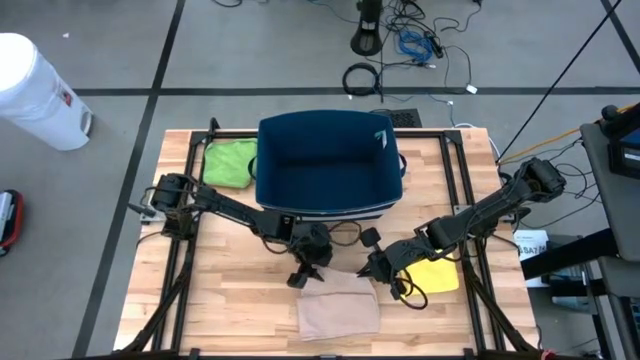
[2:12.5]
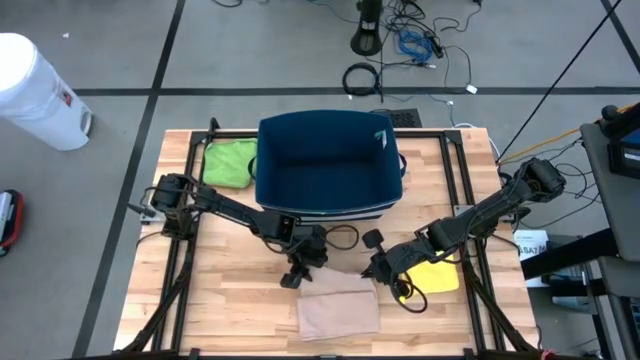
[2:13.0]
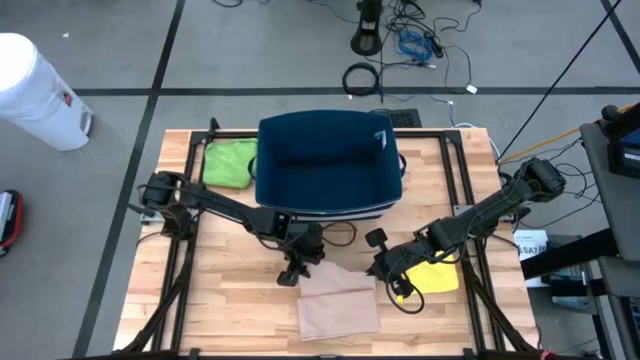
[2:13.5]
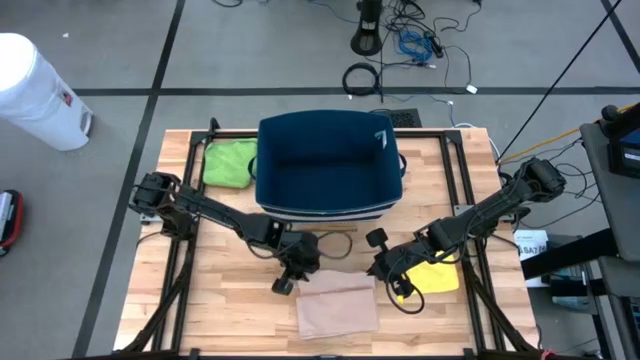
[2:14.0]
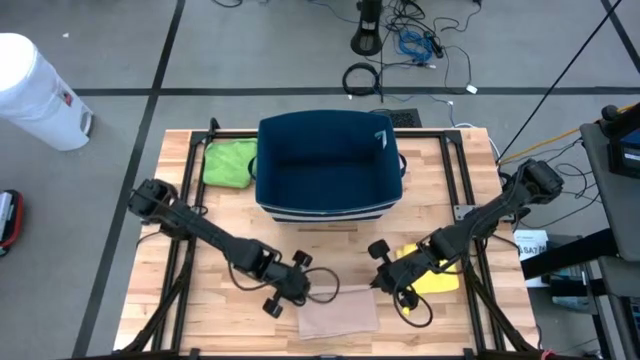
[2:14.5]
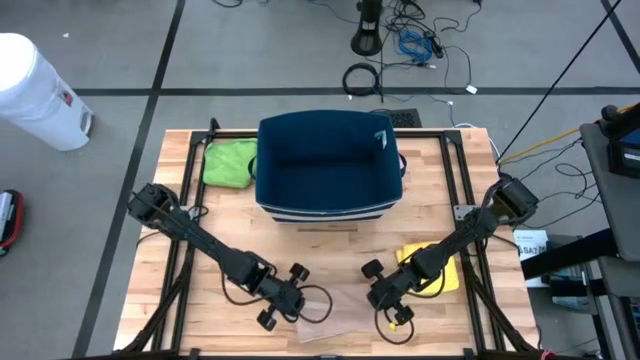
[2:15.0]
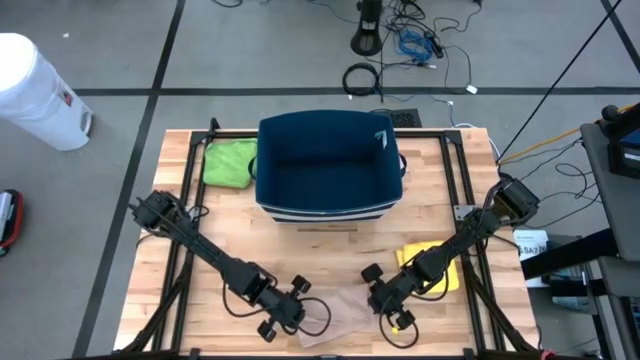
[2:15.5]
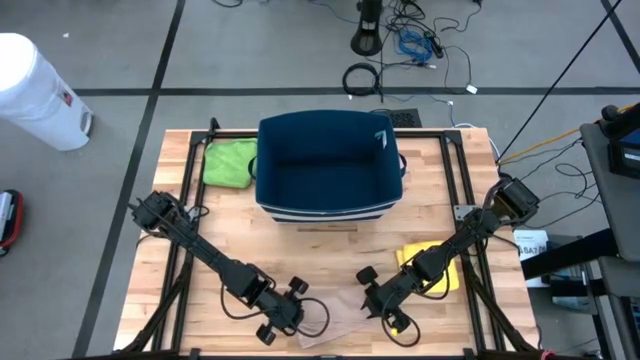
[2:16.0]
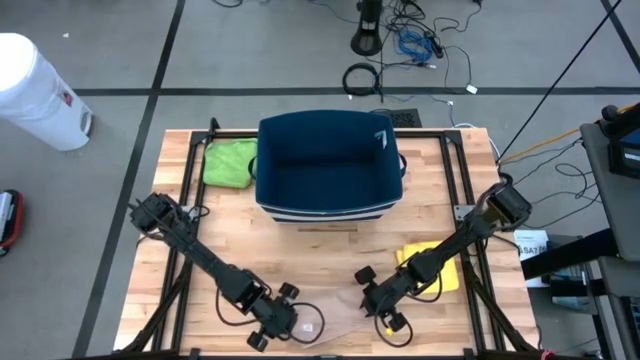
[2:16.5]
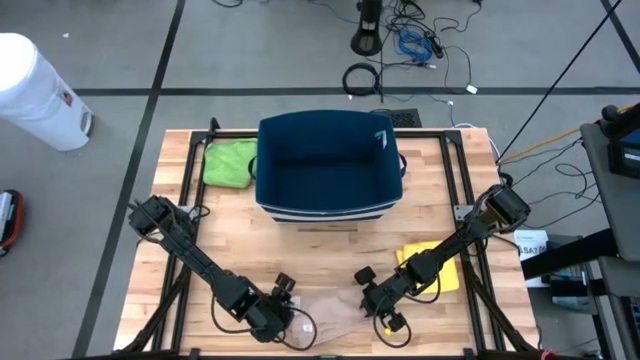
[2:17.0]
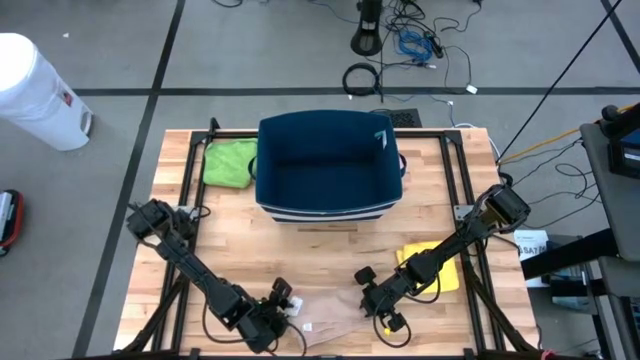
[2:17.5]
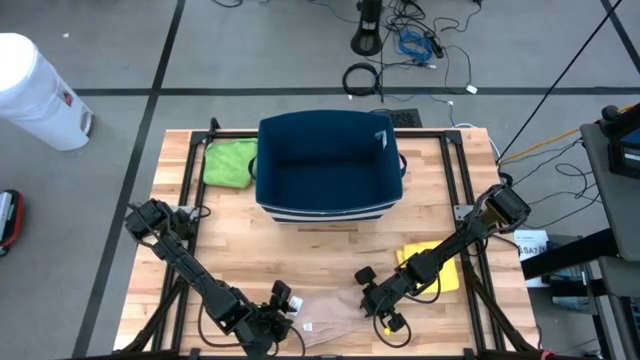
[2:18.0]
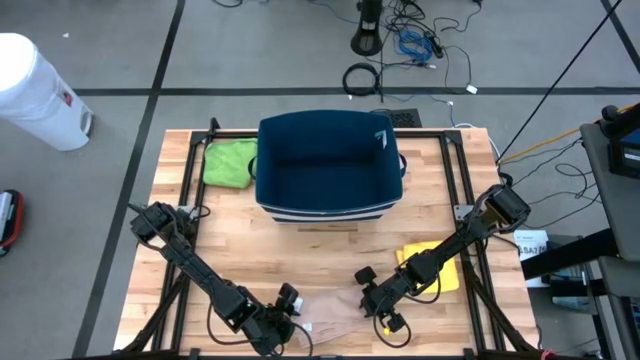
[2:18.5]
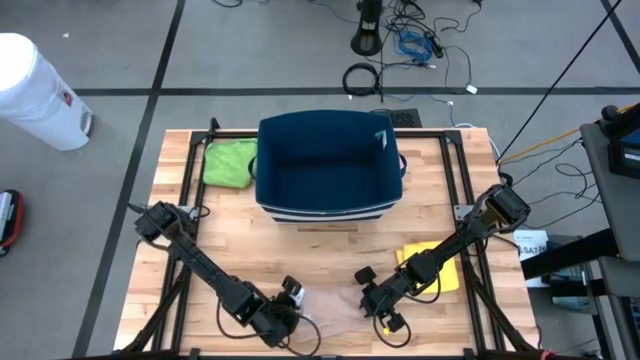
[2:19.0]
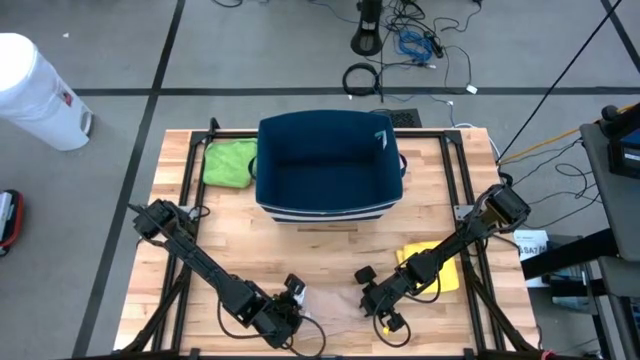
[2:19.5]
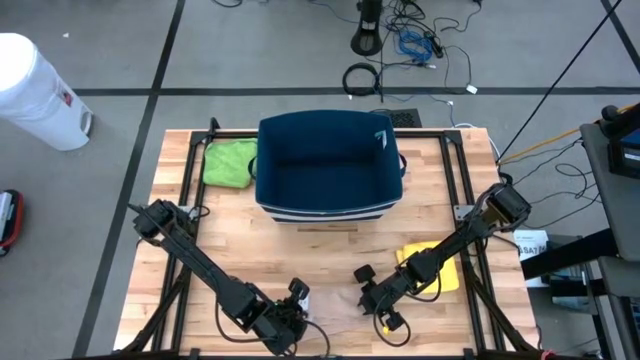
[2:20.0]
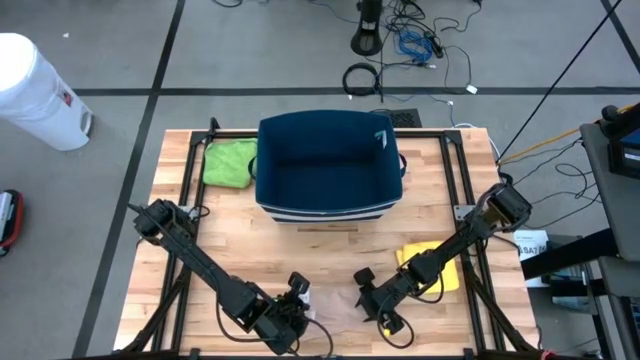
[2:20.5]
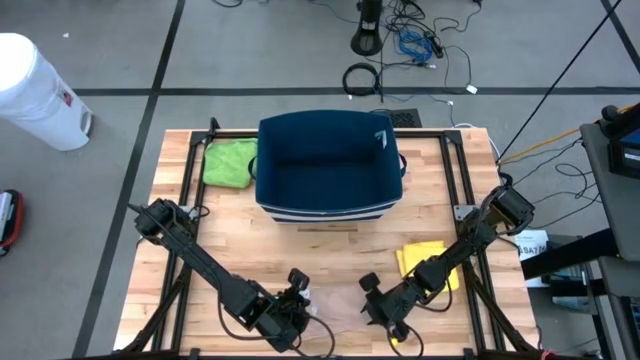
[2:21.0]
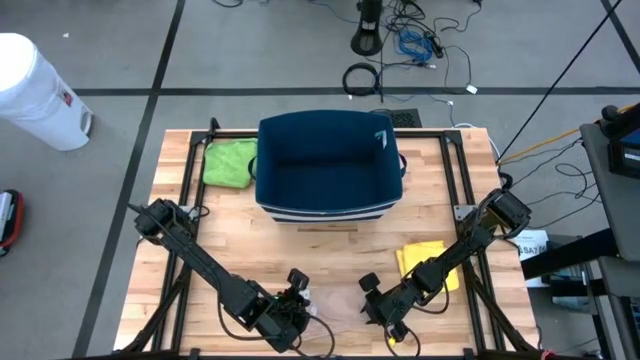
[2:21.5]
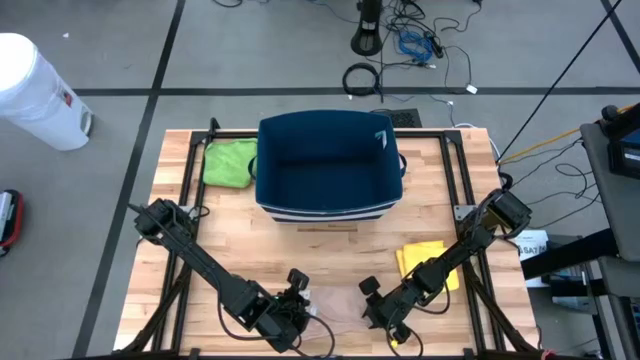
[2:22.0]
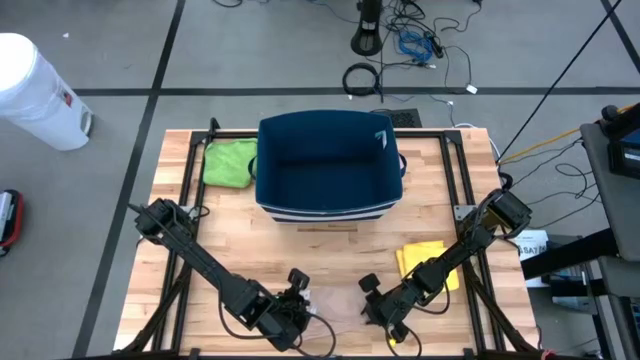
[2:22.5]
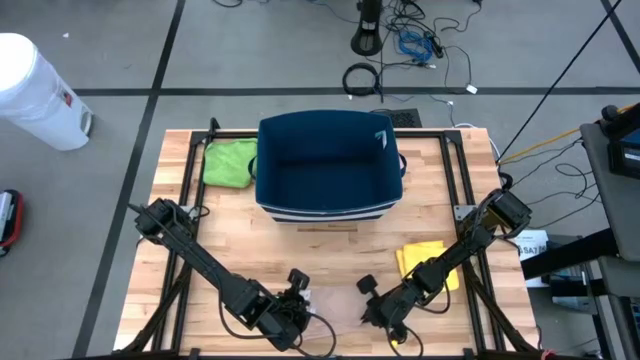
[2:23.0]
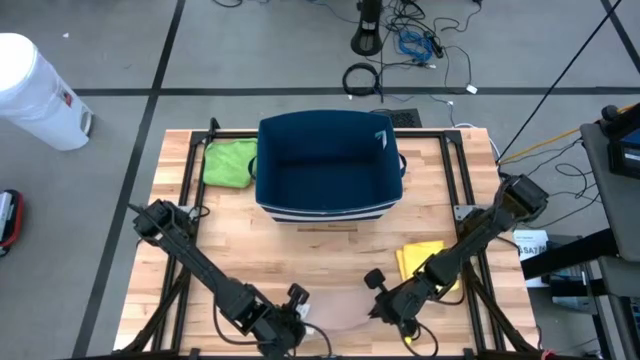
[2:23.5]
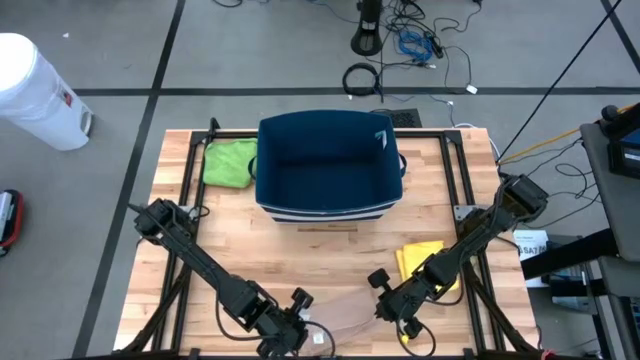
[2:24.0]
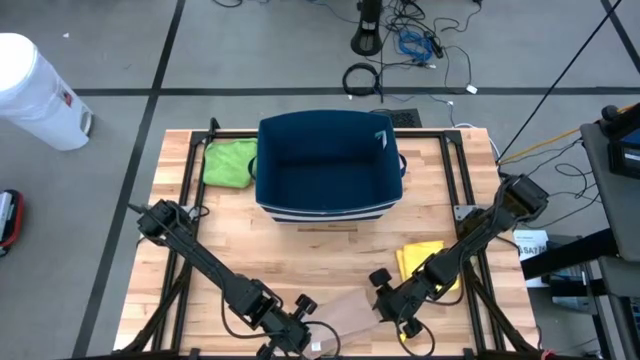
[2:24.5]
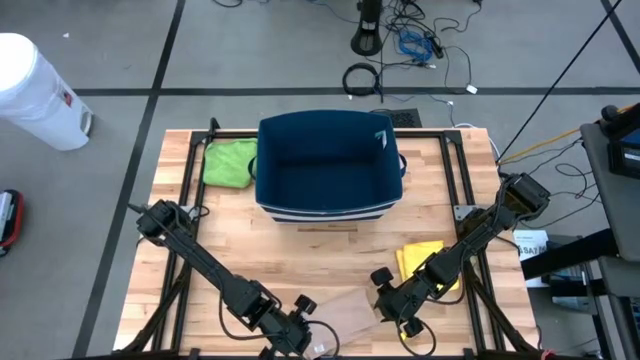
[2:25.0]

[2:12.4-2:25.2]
Task: Fold towel
Fold the light brown towel

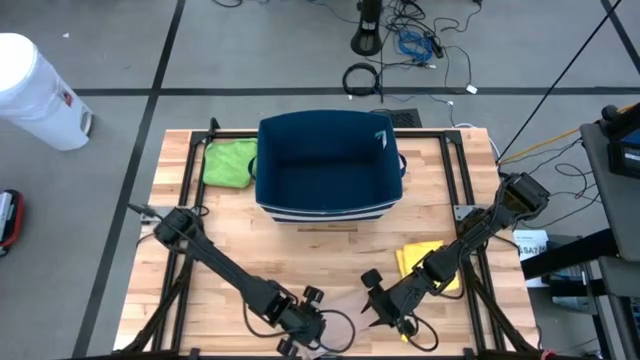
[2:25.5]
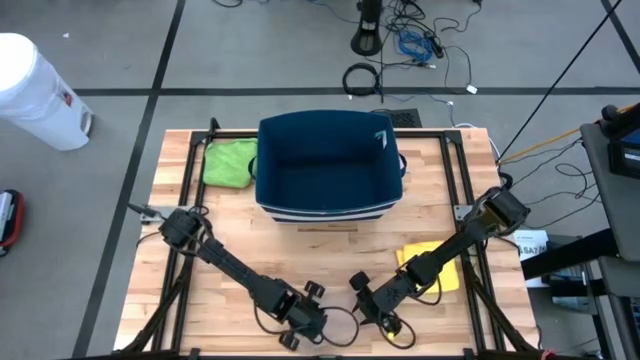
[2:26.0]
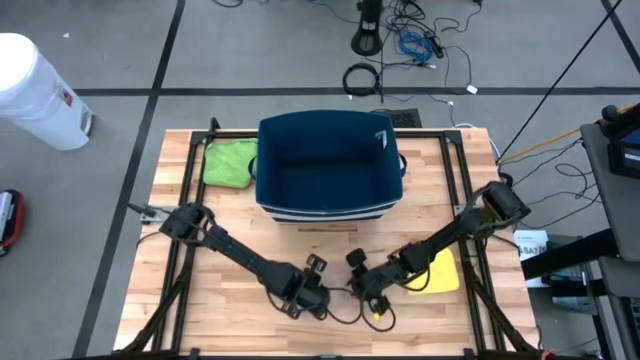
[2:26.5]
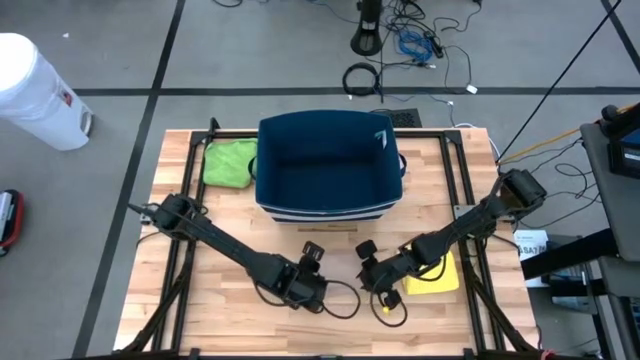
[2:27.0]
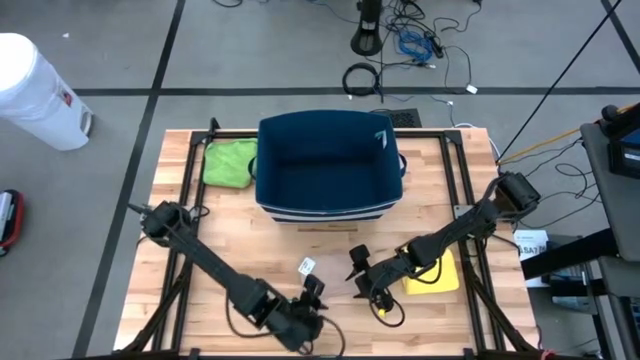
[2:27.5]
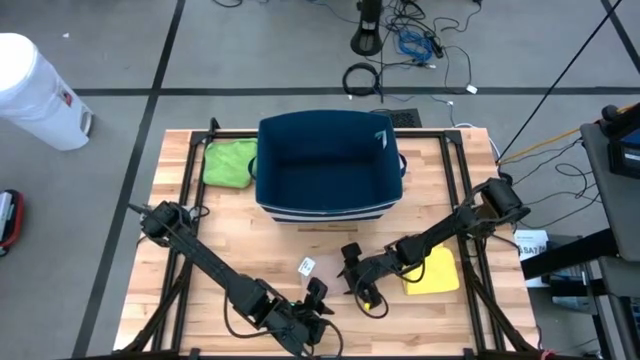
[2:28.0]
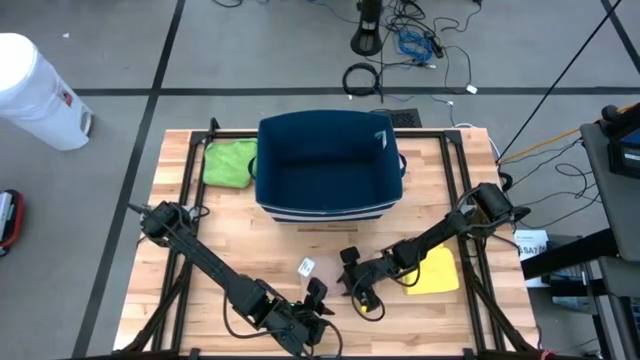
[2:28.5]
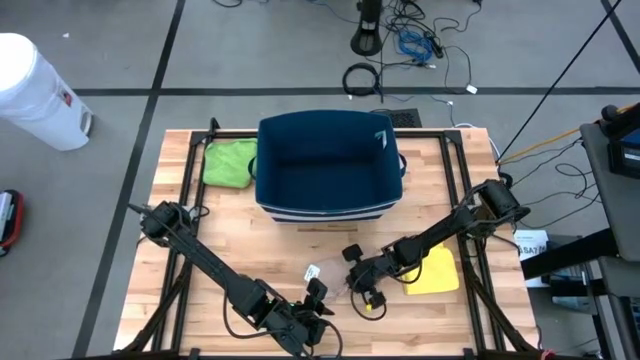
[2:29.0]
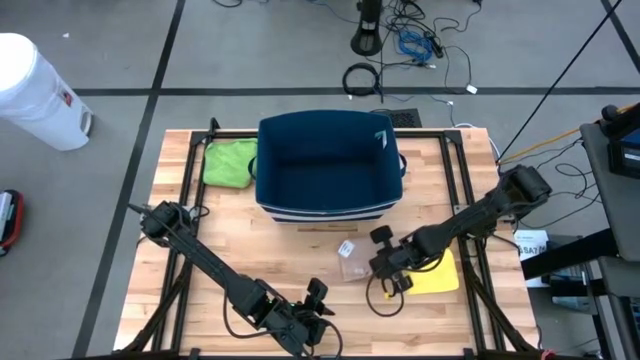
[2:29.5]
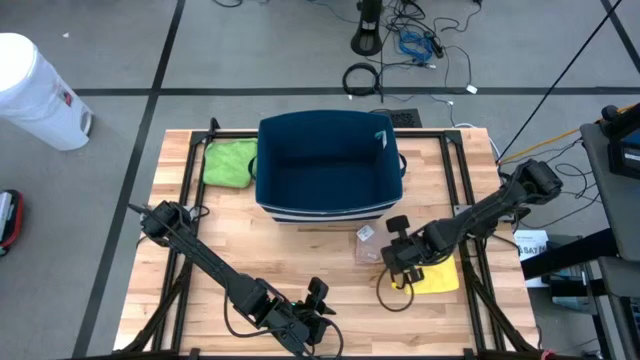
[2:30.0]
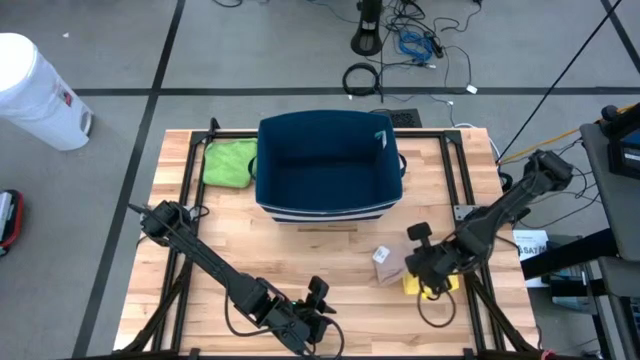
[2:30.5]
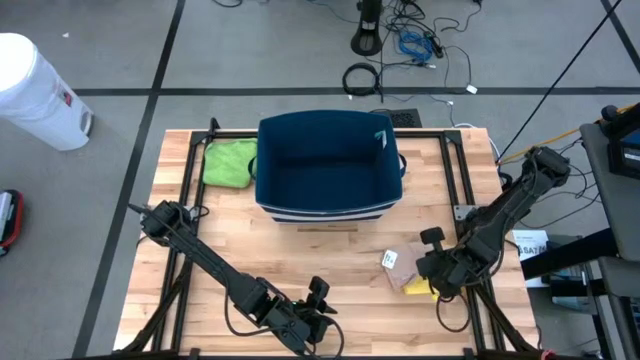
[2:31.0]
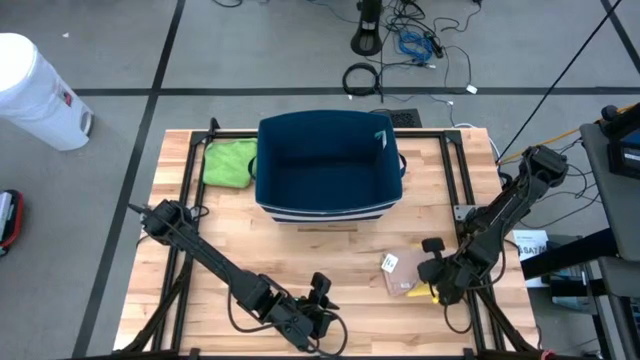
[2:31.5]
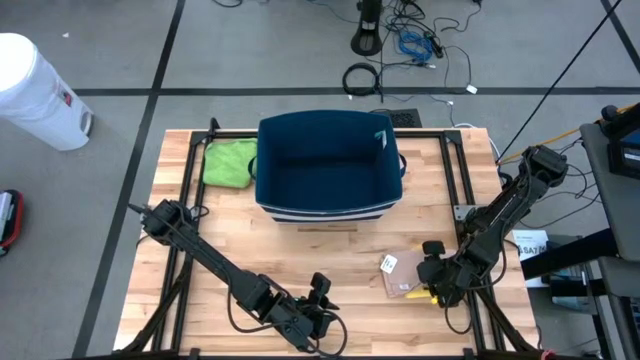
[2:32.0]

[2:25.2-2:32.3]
Stack the folded brown towel on the folded yellow towel

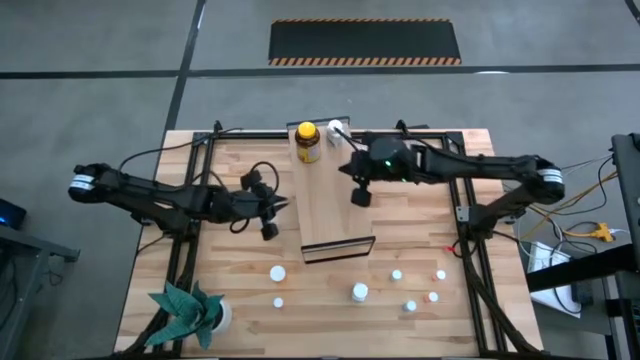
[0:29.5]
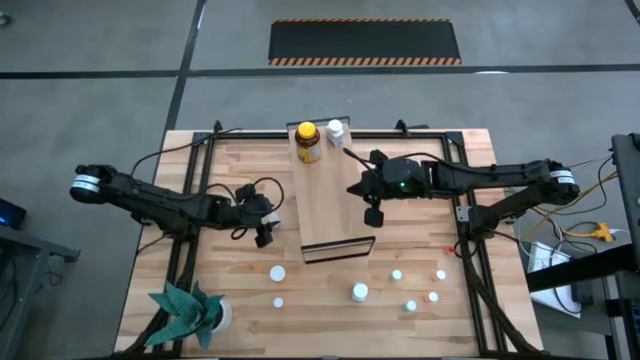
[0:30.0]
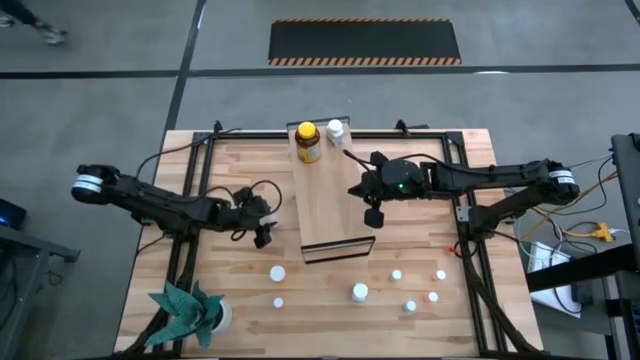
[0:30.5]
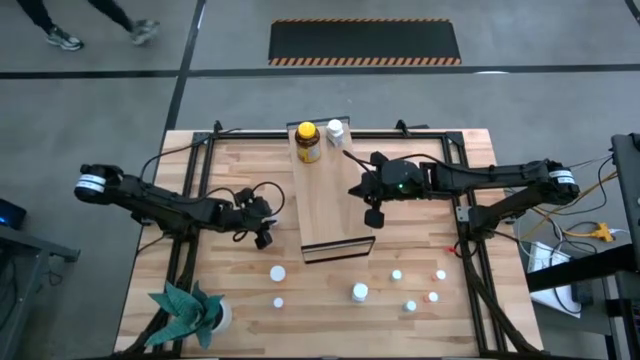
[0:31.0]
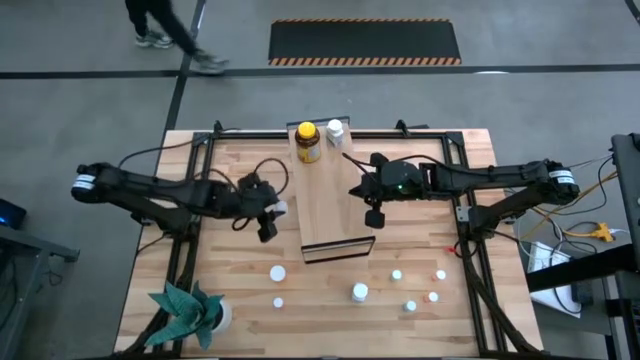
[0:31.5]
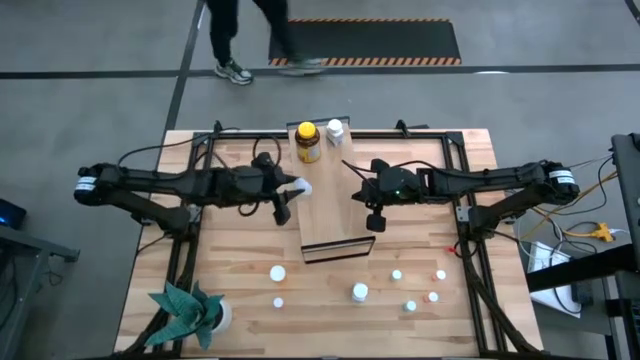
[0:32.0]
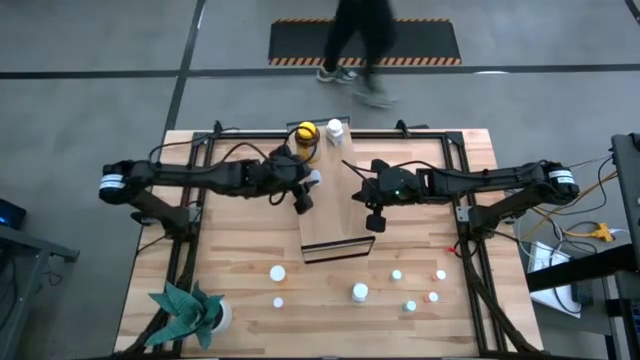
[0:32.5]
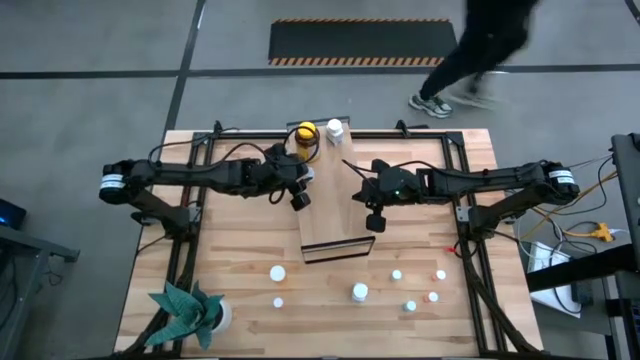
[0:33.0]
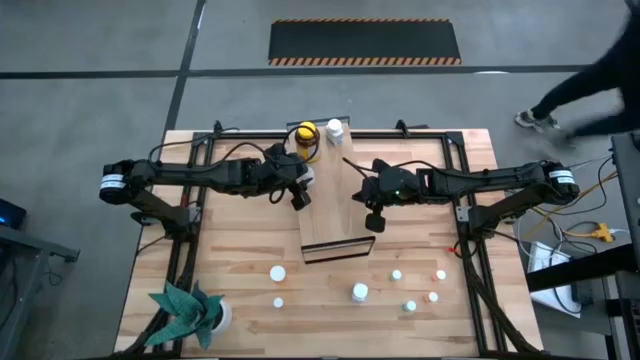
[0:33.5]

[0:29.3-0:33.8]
Task: Pick and place medicine bottles onto shelf by color
Put the transparent white pill bottle on the shelf
